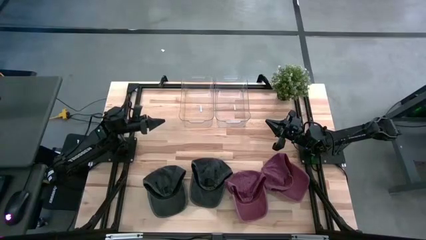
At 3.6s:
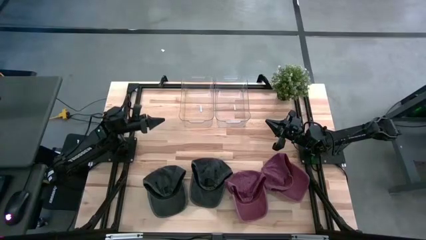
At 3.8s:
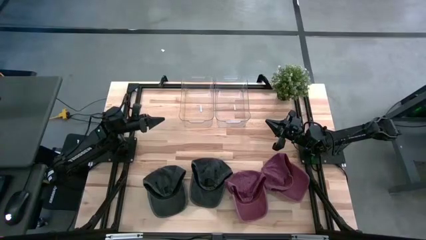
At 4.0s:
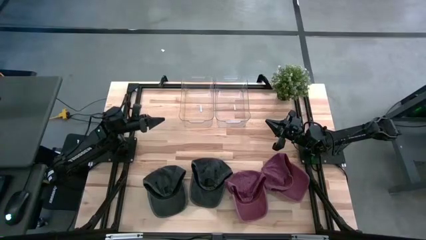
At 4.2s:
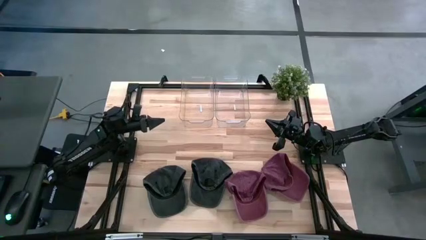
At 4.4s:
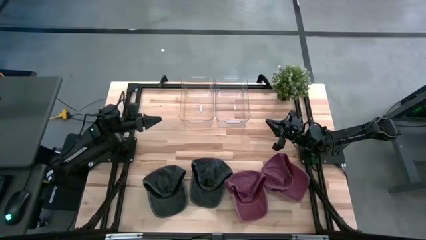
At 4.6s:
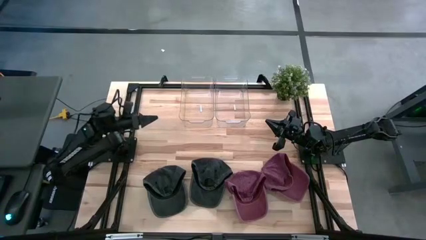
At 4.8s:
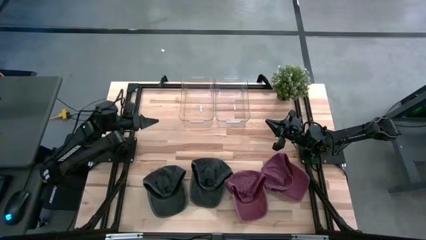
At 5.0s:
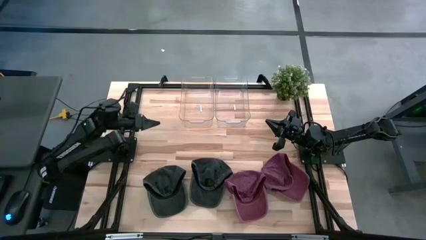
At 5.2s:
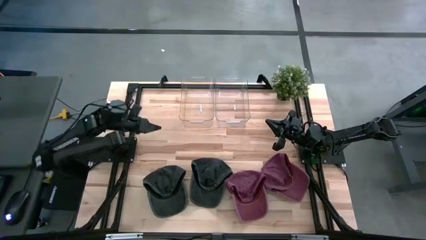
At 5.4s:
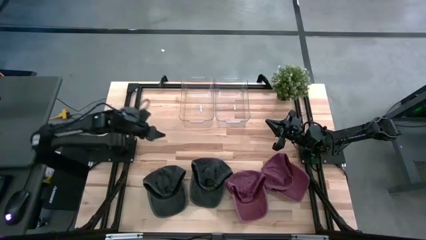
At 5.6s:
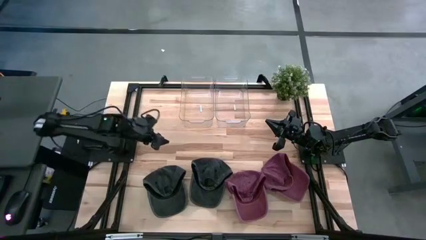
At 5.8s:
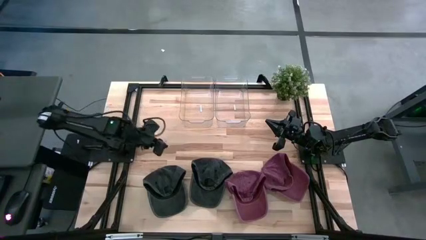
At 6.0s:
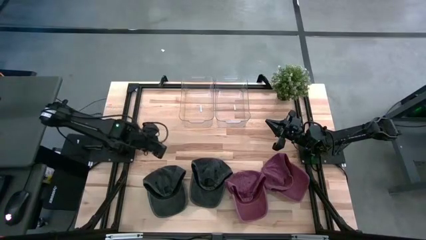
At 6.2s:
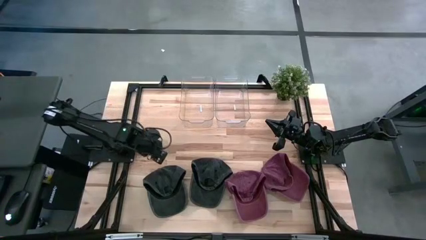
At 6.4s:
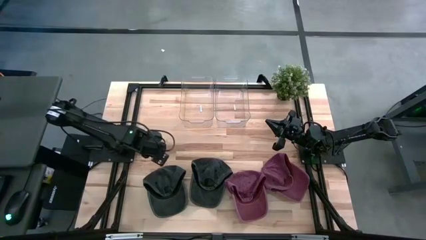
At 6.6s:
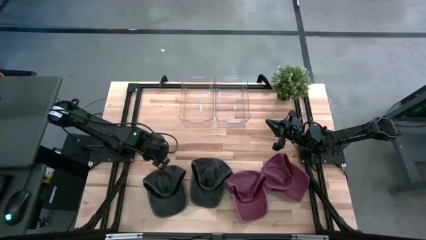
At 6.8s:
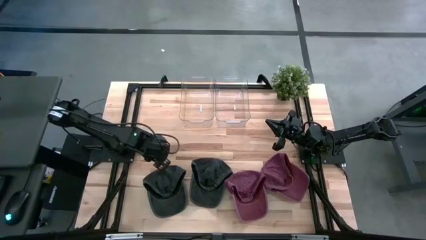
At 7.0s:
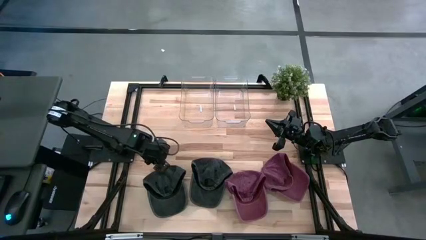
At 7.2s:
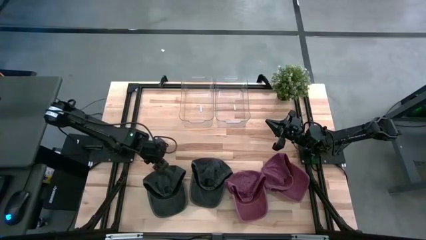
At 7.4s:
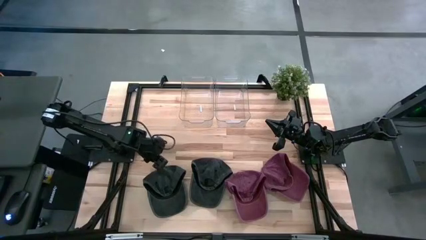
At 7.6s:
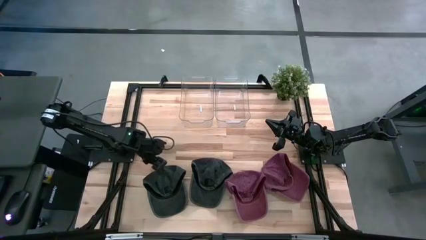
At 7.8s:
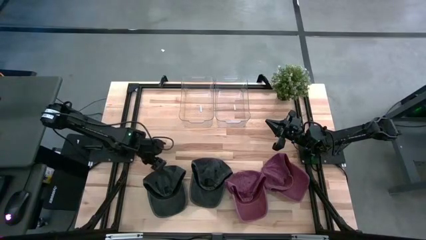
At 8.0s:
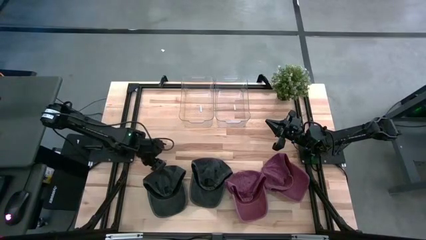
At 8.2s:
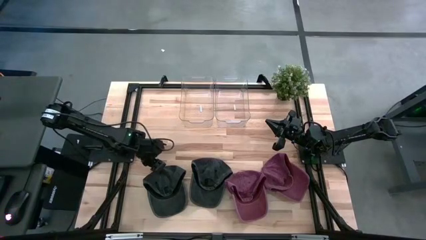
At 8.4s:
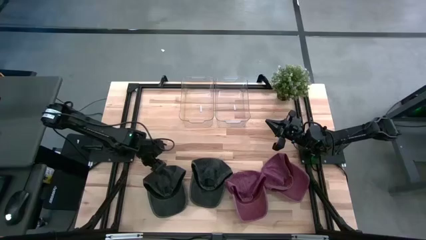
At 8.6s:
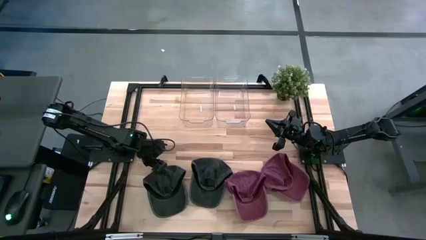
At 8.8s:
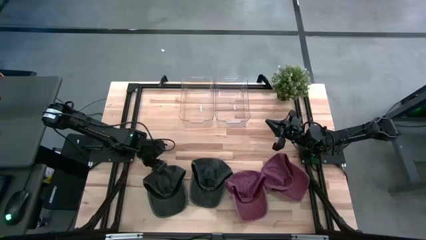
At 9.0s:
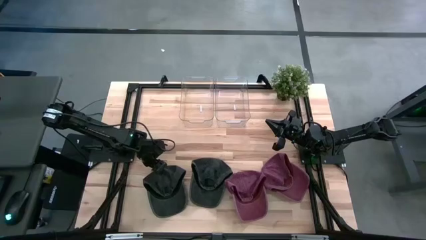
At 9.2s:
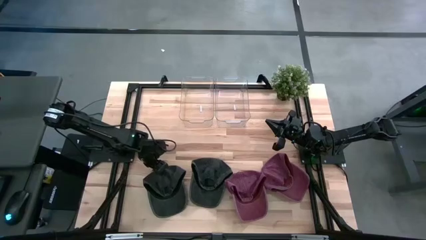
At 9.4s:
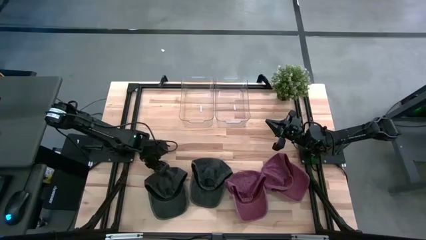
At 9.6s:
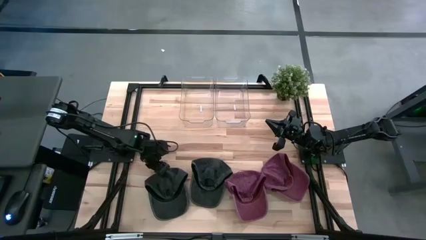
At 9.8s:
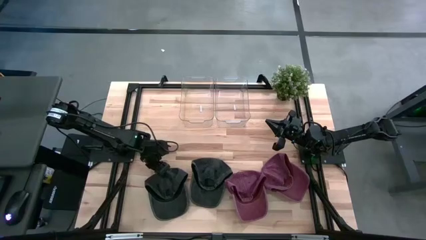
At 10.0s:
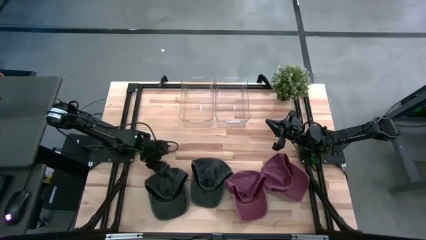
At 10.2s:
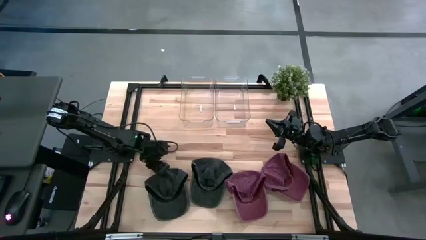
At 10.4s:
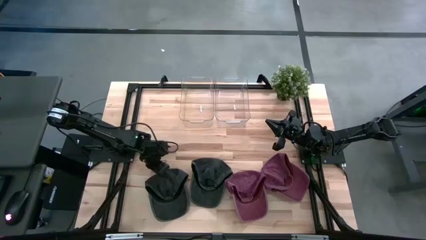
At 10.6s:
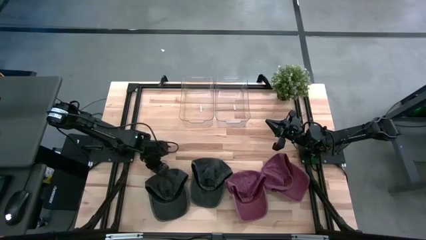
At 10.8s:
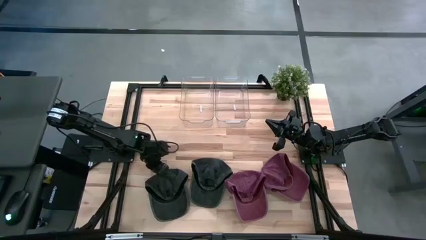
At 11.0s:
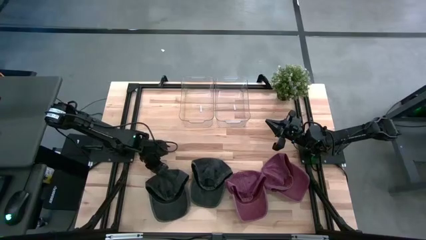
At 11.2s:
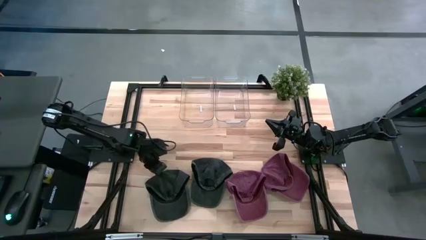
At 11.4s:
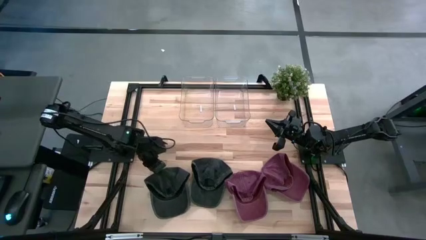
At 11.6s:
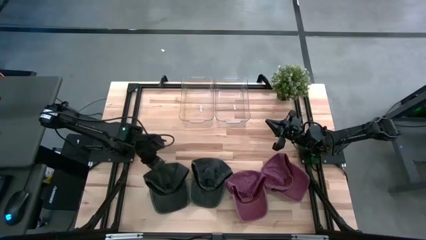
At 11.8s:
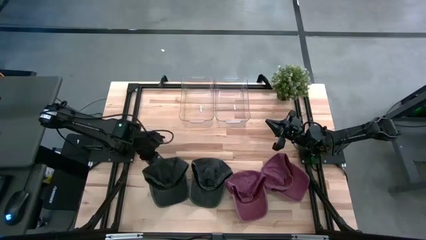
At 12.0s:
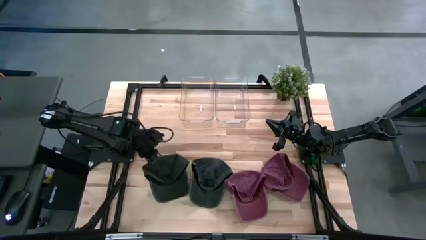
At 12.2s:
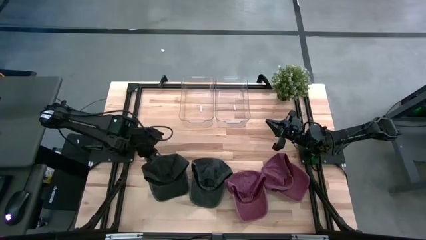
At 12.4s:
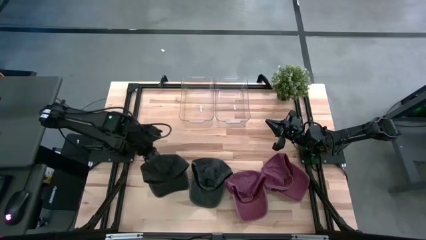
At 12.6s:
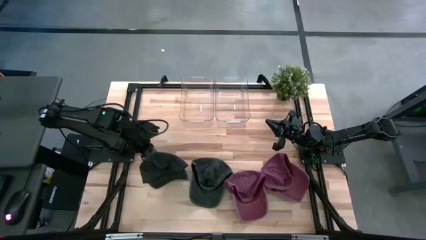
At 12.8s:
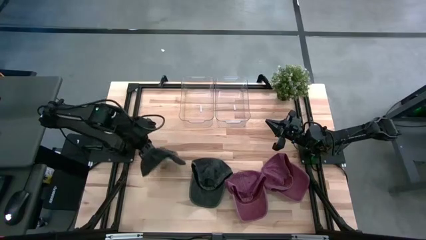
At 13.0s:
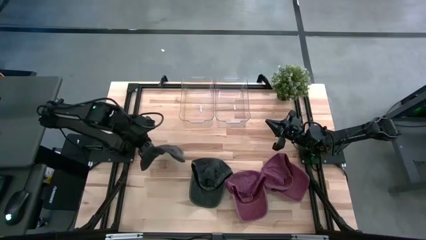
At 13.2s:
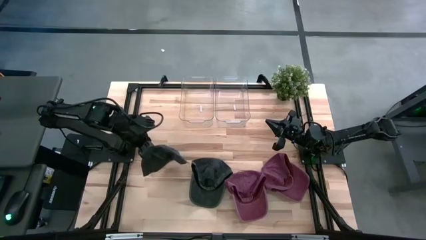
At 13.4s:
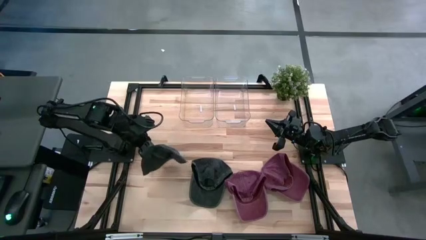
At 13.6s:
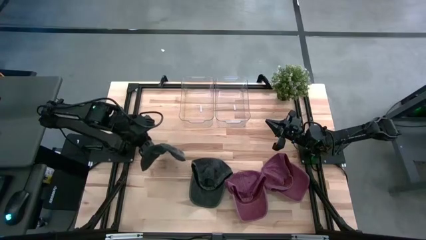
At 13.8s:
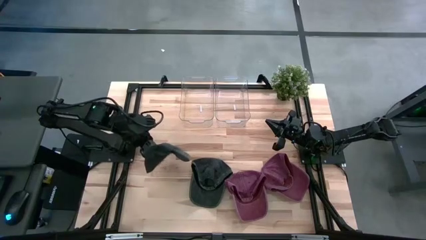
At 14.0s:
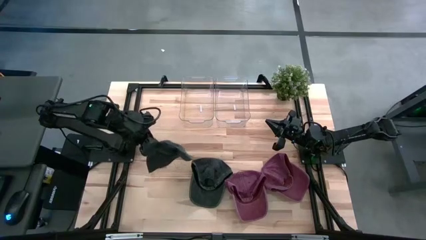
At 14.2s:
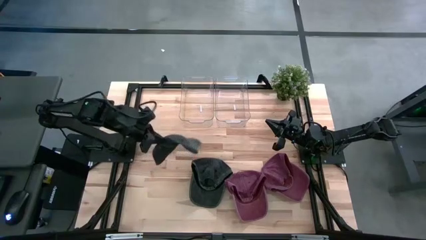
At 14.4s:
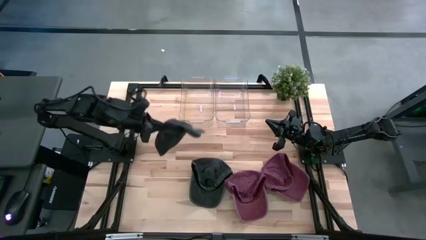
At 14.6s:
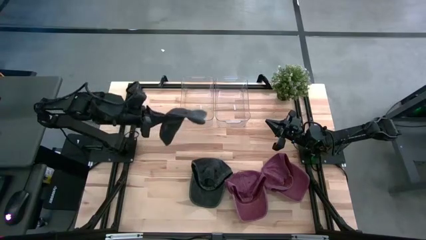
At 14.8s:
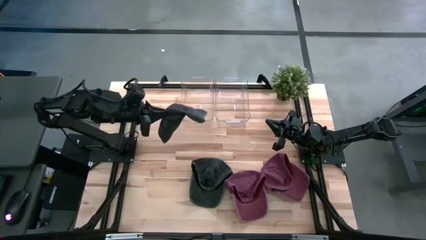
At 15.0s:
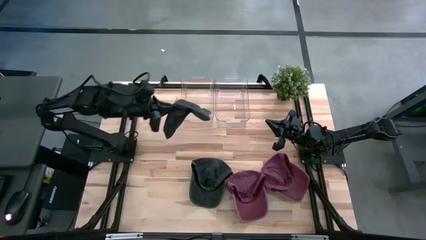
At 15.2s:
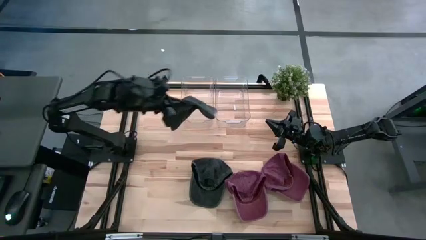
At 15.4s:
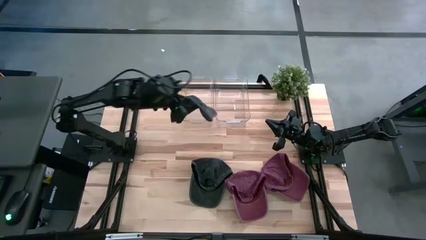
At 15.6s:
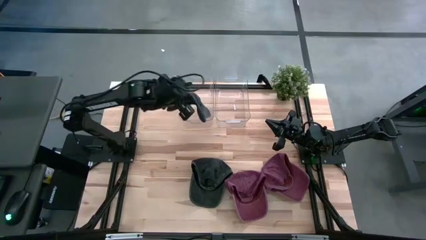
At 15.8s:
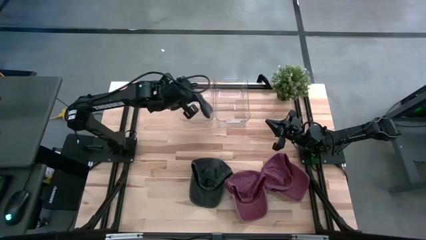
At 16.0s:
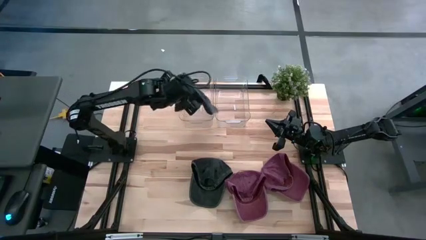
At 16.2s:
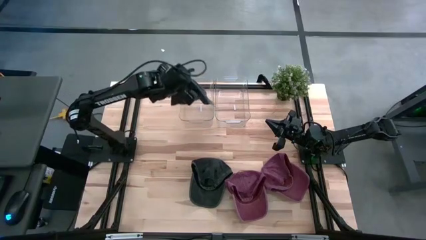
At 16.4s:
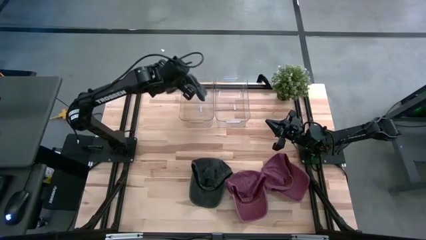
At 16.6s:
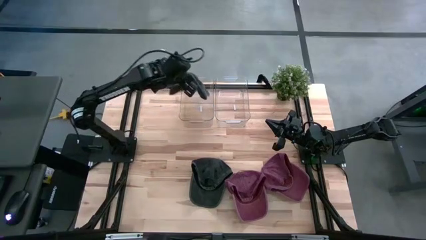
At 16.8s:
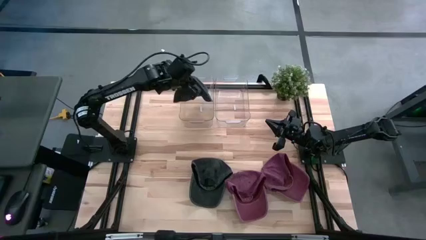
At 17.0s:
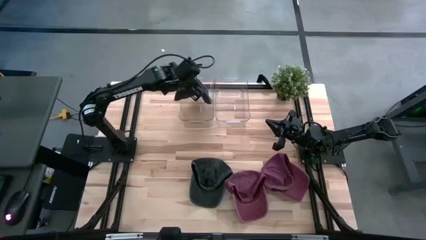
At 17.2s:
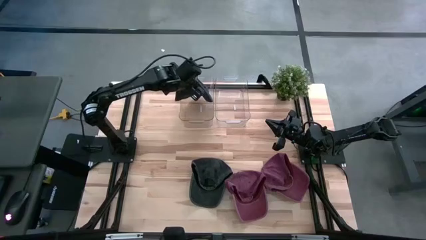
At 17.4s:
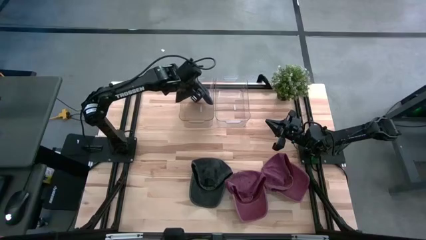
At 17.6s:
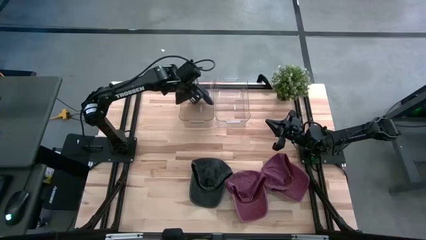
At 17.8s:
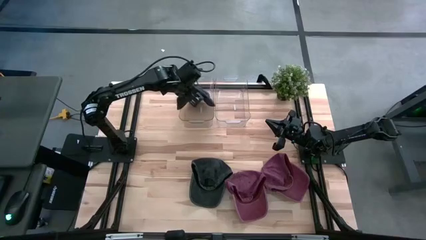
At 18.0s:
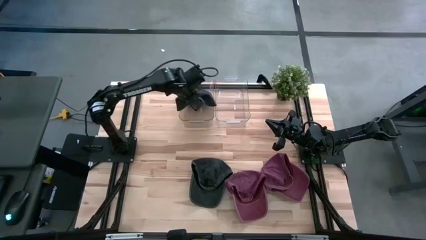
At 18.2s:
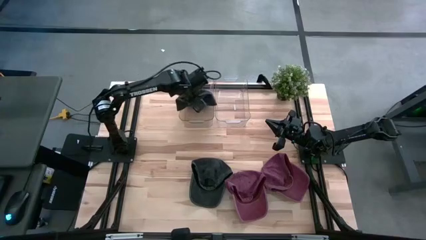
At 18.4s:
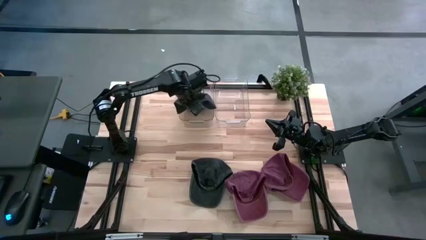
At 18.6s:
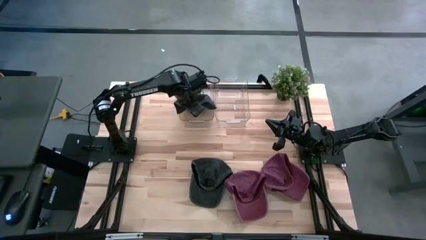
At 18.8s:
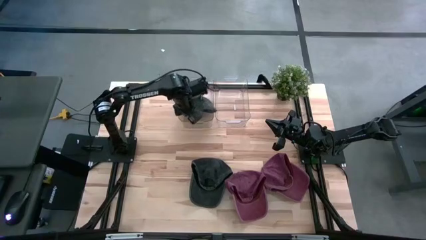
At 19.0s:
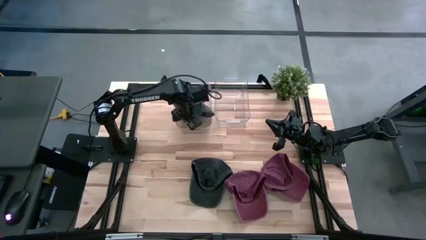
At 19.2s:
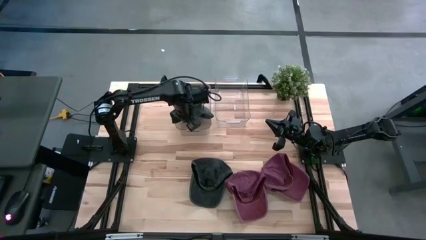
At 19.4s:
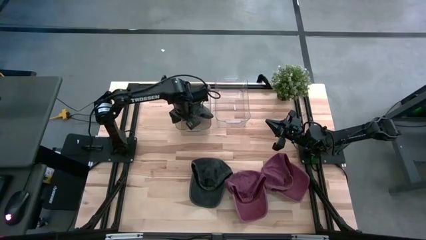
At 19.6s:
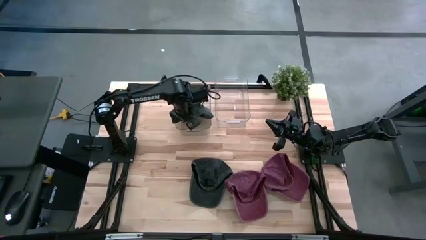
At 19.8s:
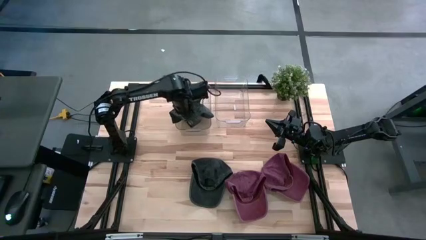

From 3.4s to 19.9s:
Task: Pick & Place hat
Put the left black cap into the left transparent bin
